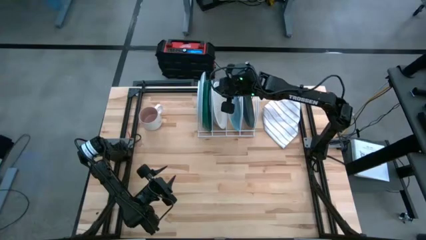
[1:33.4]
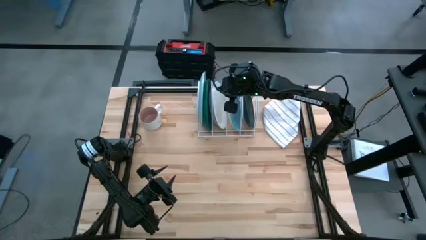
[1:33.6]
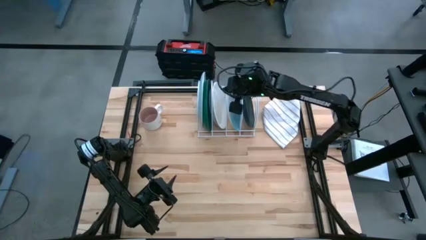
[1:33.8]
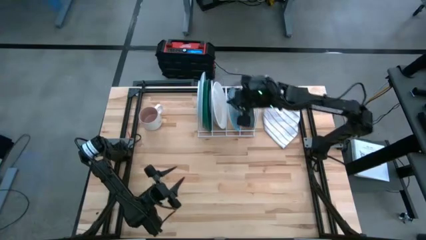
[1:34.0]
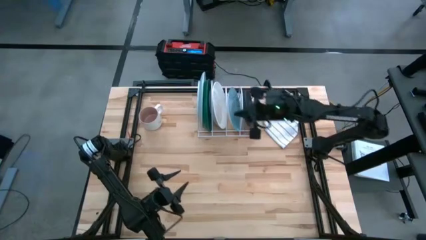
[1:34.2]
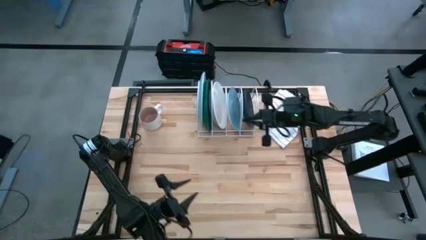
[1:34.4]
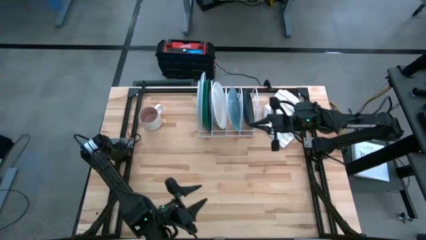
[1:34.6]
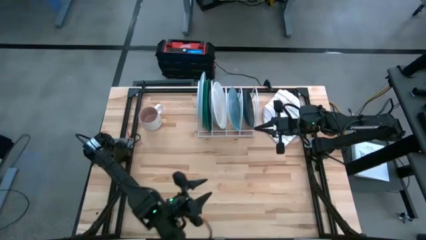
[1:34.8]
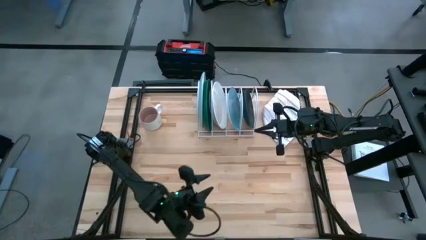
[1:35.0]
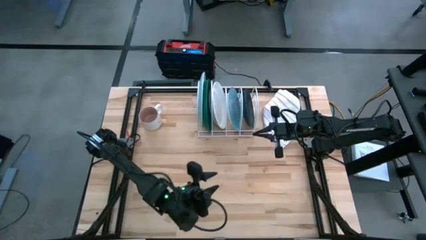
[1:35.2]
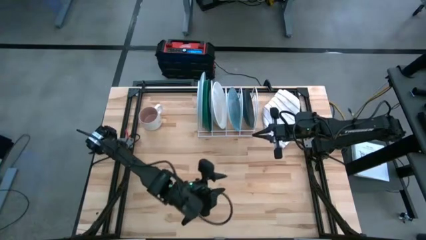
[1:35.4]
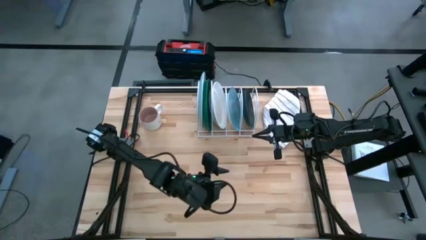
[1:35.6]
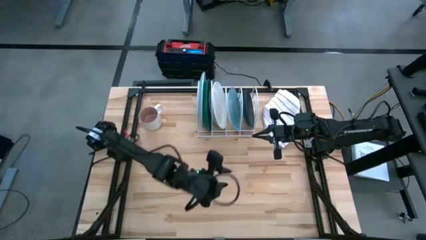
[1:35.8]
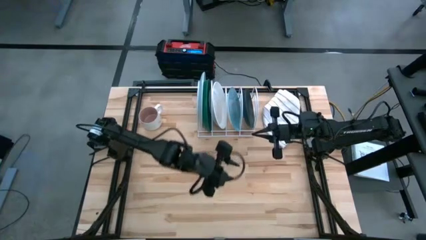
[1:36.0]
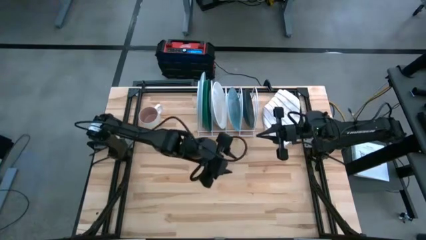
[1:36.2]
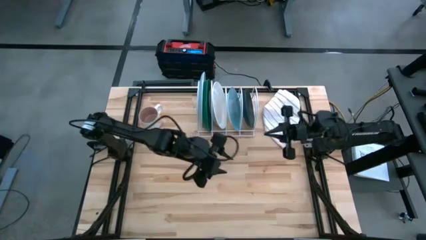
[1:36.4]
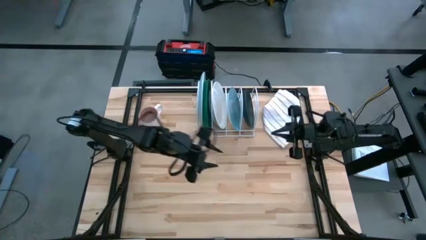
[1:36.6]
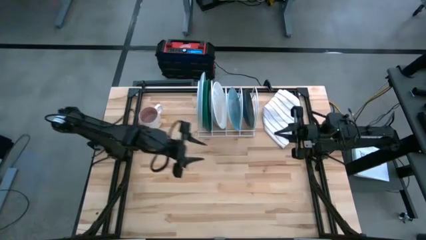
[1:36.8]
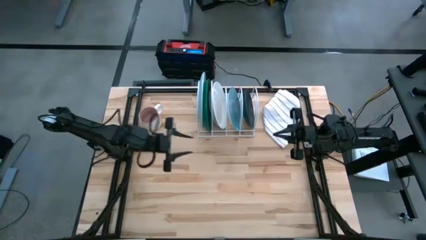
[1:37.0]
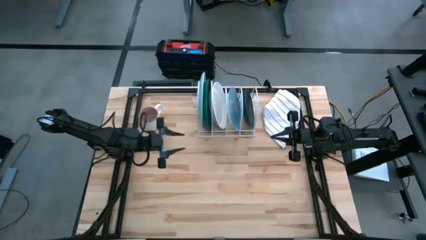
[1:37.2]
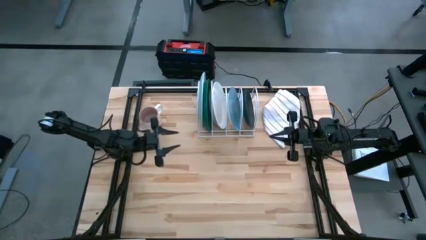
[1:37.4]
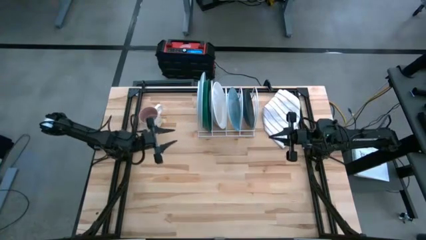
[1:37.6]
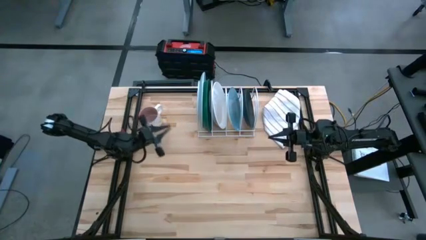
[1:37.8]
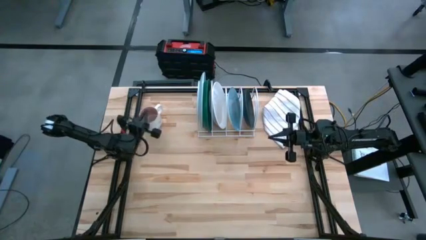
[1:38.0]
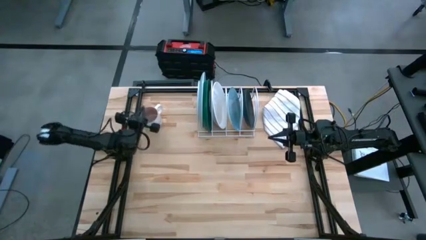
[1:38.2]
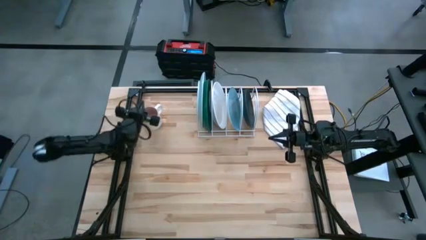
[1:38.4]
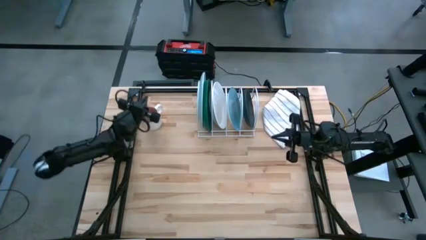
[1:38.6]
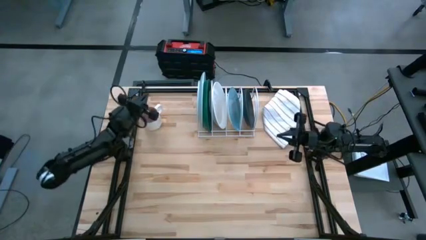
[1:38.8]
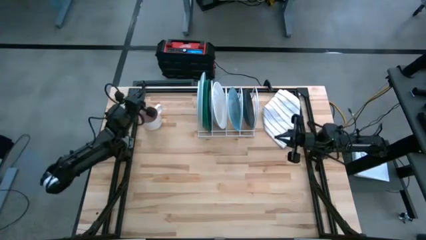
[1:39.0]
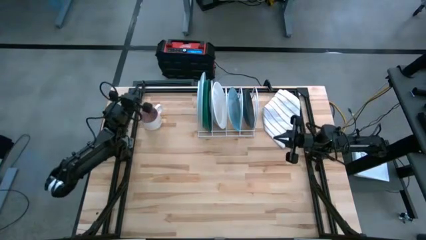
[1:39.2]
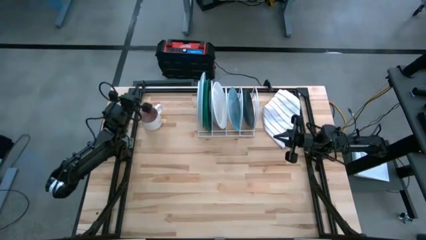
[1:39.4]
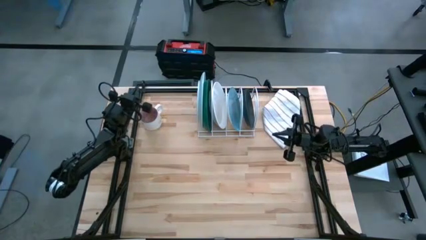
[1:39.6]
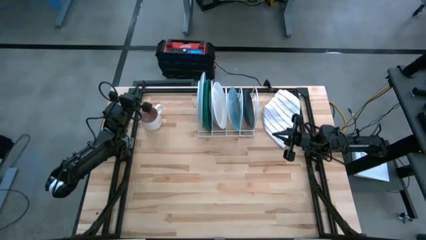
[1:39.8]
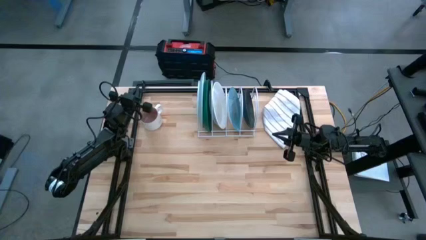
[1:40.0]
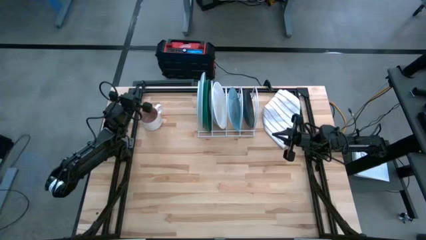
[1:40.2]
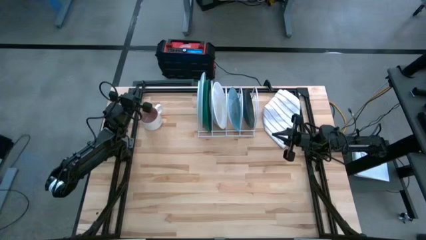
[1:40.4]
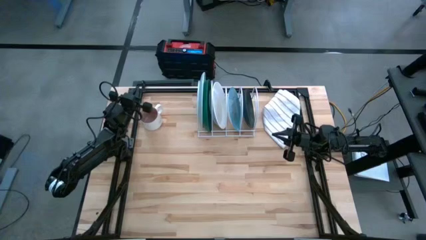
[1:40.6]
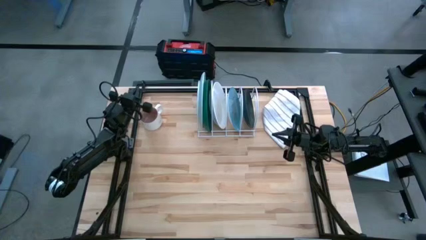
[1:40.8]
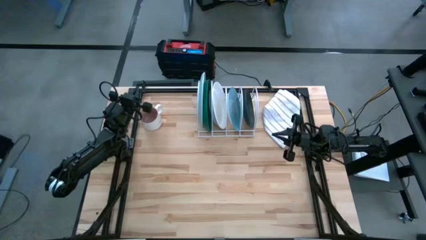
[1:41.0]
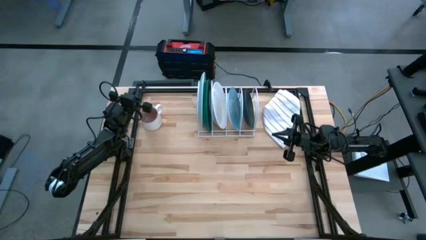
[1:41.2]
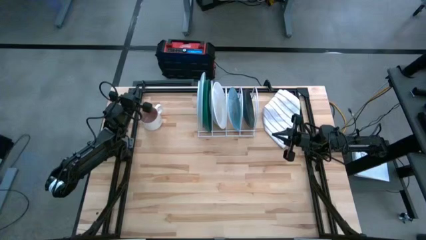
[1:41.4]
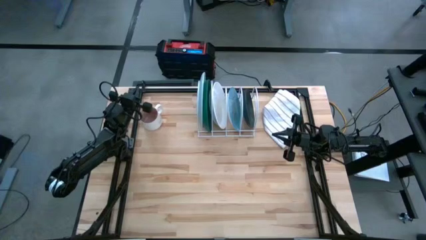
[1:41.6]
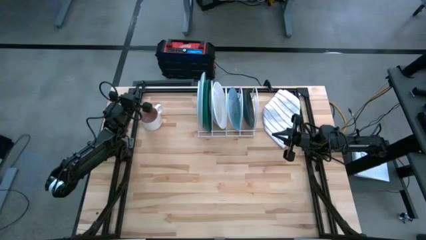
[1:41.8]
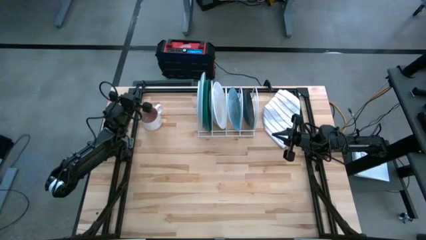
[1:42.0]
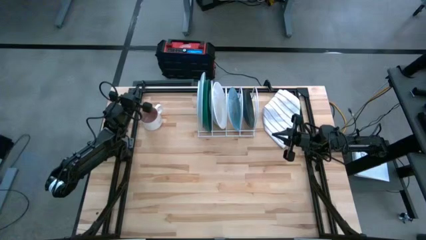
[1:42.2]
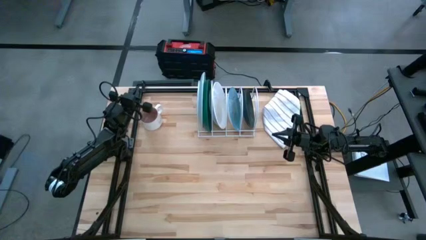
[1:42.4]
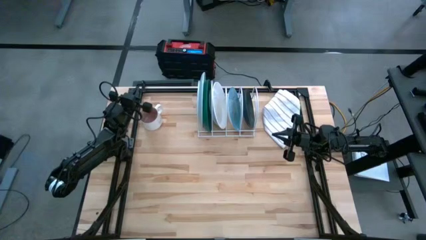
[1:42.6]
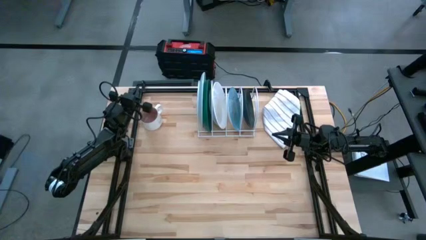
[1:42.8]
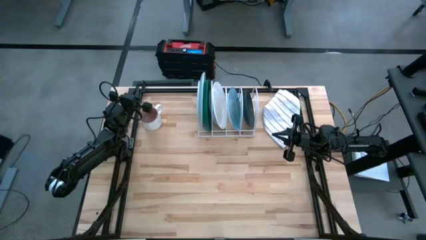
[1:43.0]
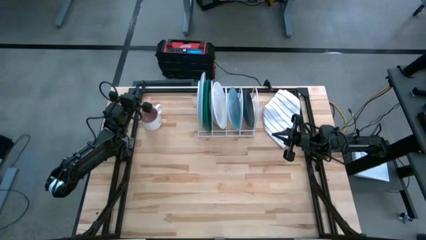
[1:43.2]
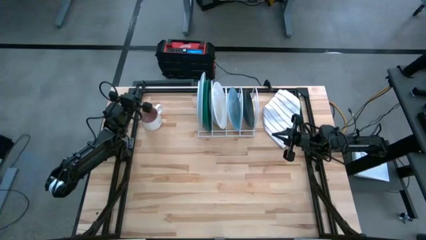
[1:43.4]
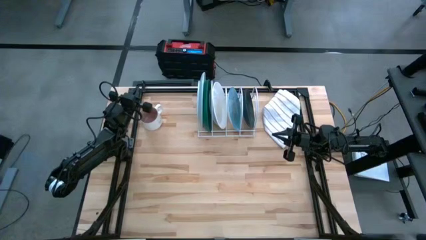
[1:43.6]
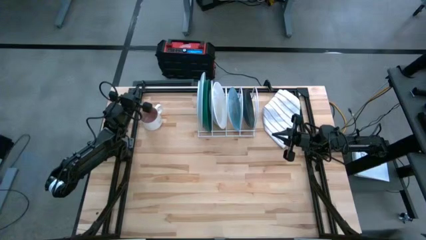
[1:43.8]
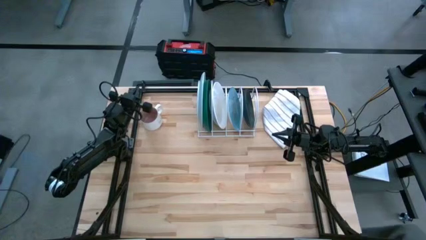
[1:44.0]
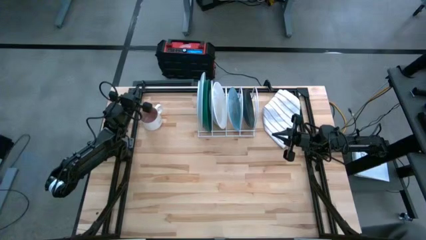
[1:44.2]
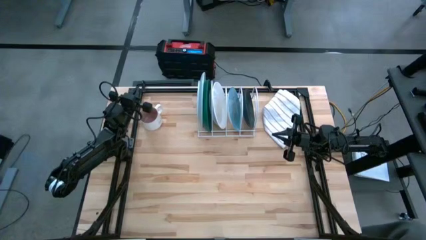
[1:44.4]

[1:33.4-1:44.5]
Task: Sort dishes
Return to Home Position

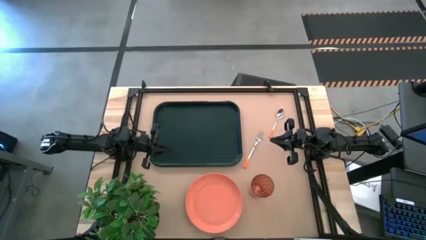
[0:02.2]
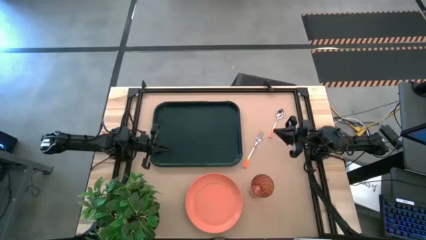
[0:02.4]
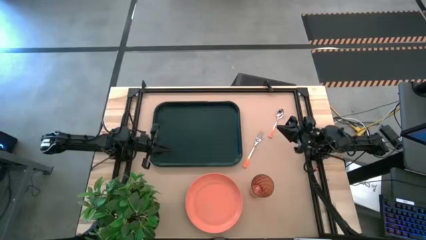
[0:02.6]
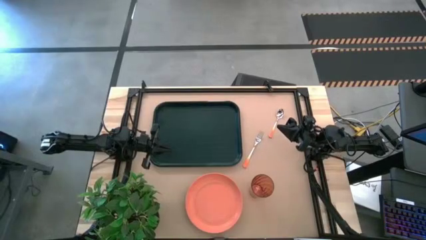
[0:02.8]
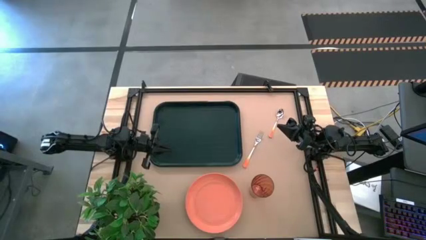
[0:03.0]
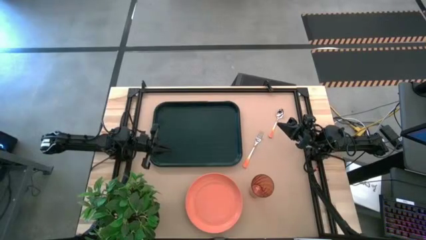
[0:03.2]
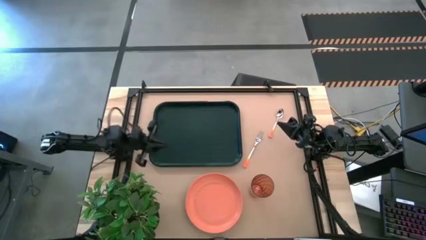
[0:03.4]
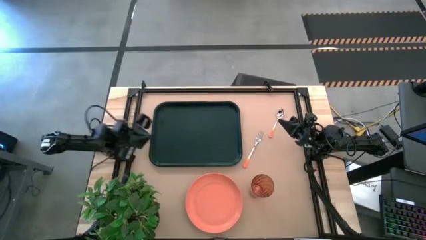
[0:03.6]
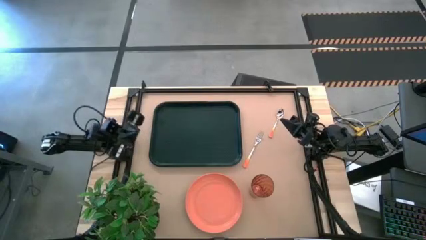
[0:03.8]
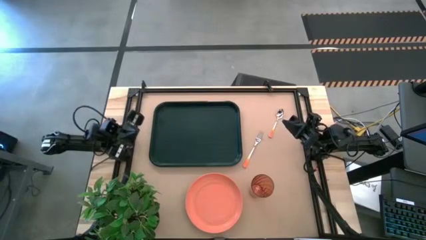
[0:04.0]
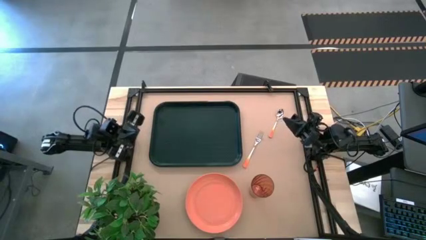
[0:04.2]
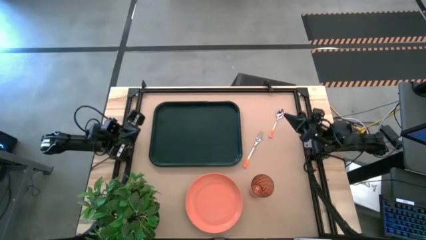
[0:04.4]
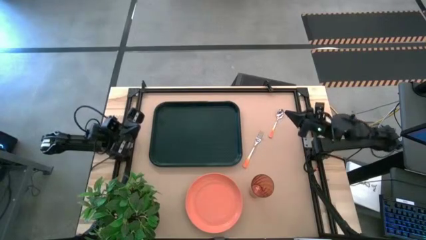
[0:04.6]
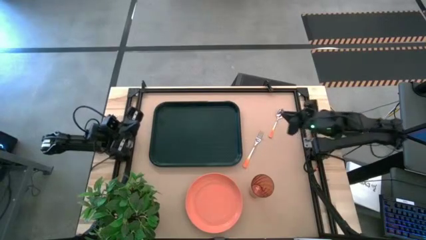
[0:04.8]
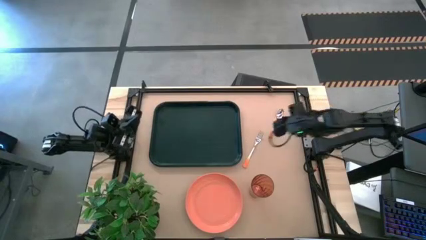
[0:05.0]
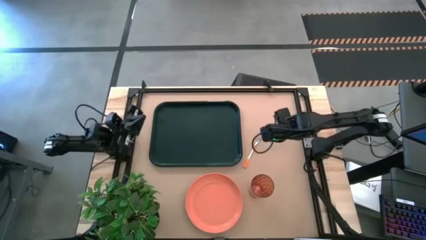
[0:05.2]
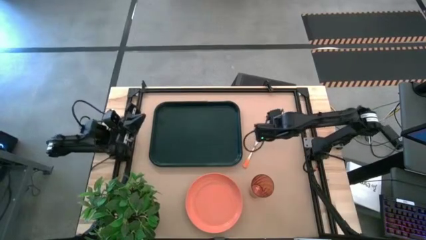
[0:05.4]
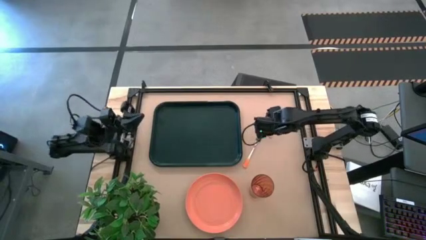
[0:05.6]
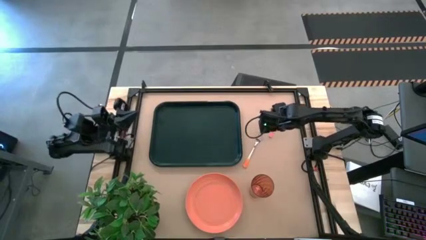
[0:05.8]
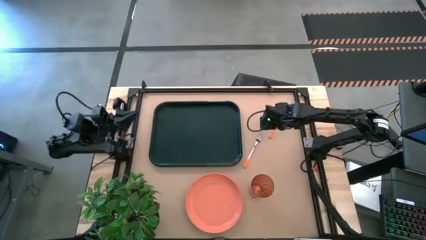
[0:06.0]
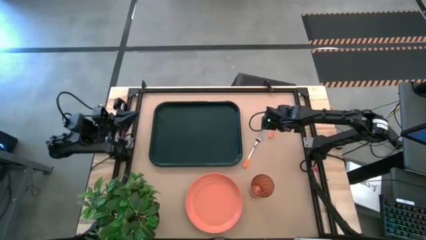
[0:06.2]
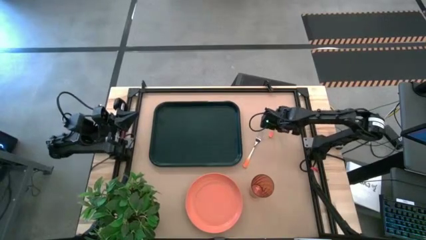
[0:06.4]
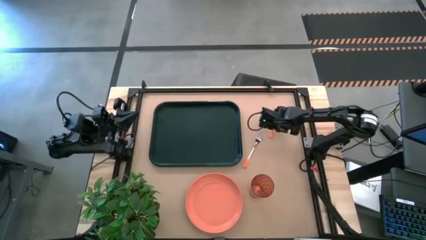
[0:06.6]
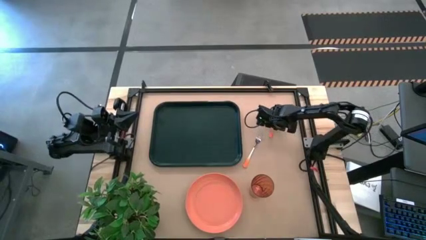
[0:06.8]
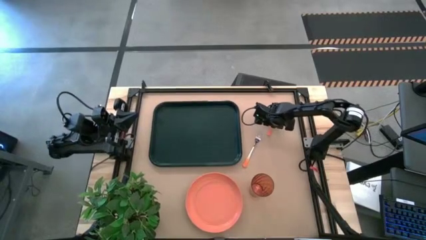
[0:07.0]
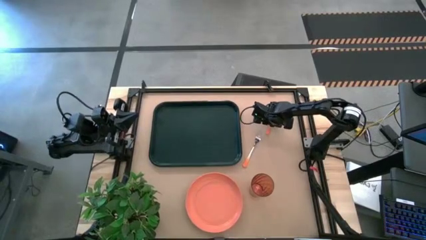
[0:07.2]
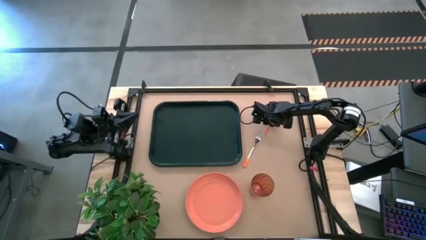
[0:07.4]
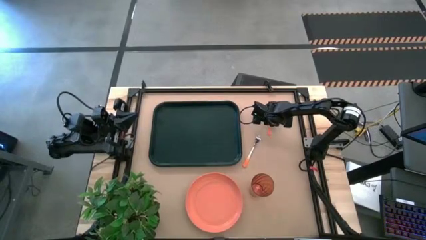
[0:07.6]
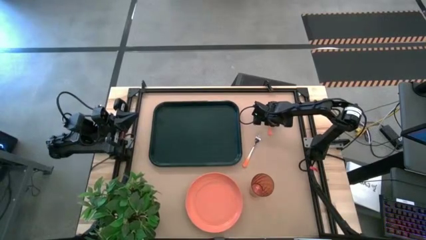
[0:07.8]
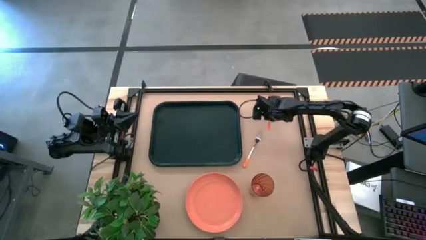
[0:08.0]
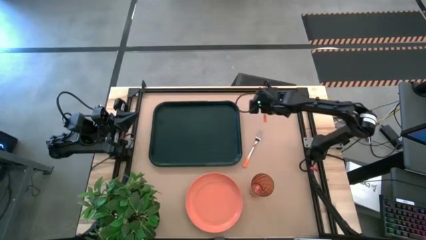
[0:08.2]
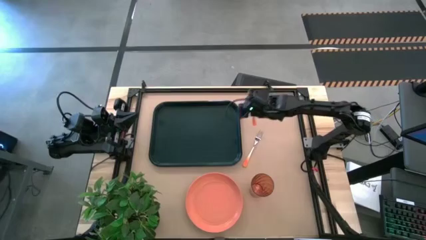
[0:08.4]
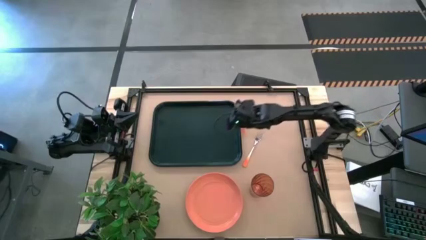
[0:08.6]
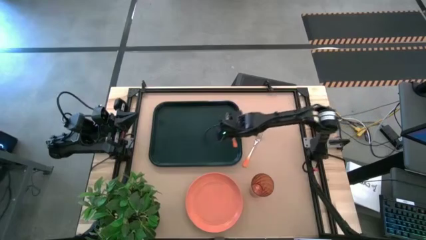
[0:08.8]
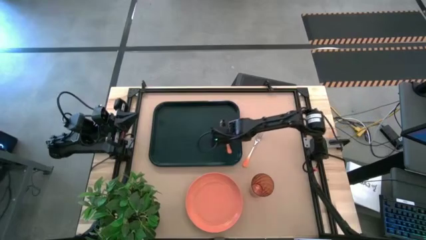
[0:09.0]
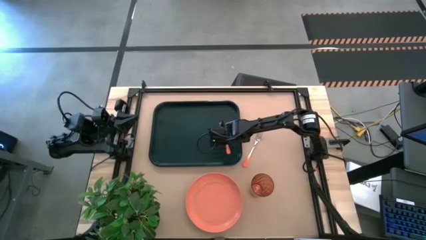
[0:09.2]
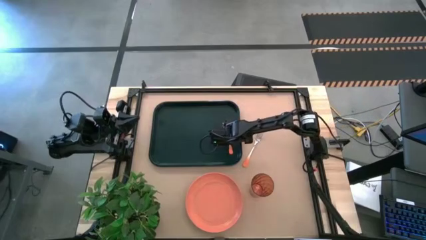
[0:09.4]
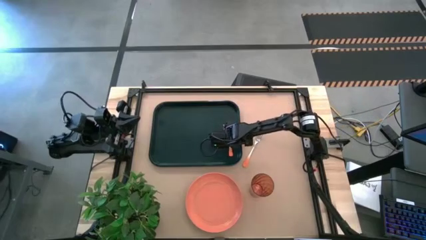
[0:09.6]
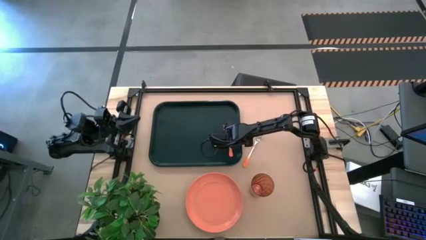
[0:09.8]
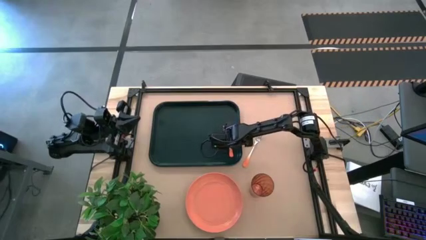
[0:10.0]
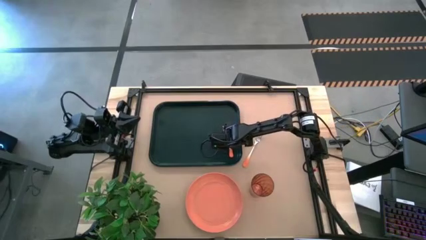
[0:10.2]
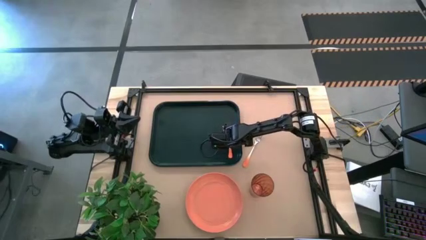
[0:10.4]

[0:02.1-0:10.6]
Task: Pick and place plate/cup/fork/spoon on tray
Put the orange spoon on the black table tray
